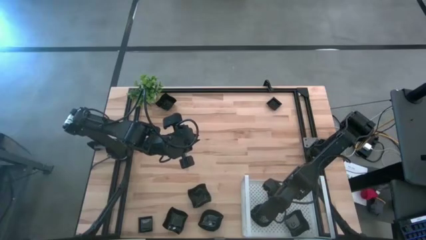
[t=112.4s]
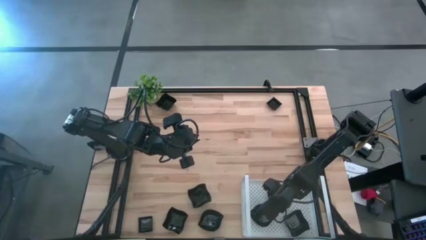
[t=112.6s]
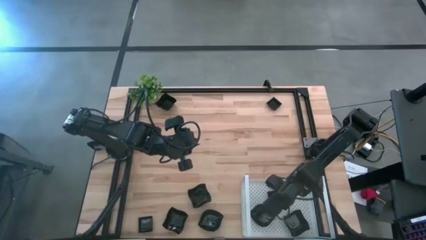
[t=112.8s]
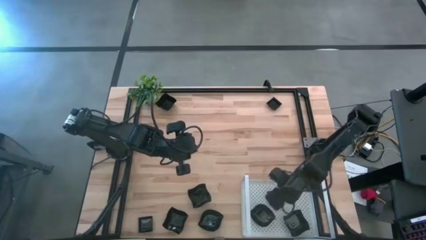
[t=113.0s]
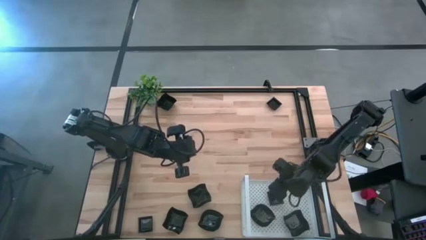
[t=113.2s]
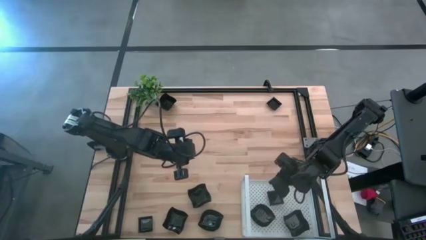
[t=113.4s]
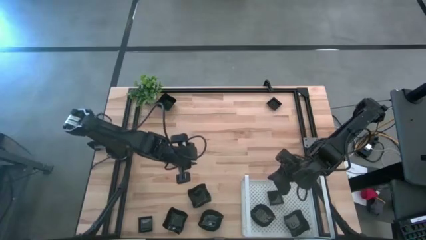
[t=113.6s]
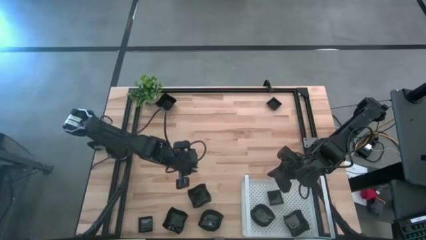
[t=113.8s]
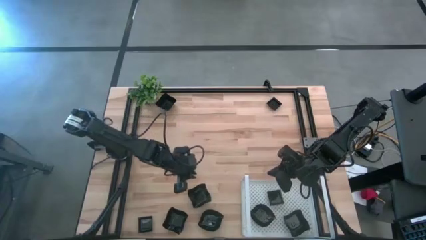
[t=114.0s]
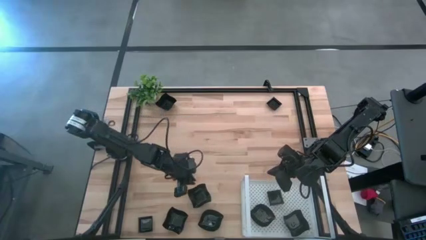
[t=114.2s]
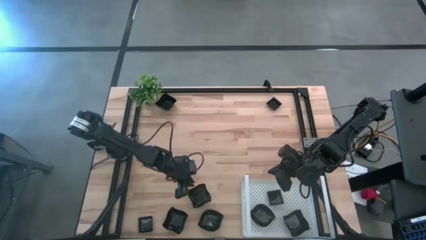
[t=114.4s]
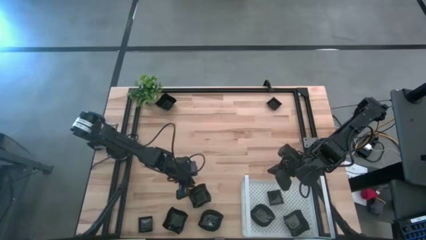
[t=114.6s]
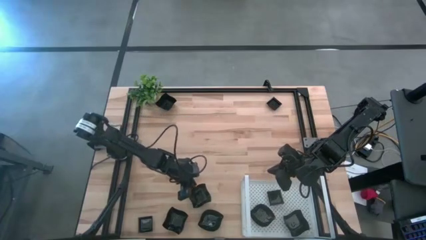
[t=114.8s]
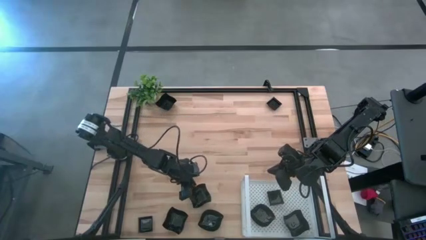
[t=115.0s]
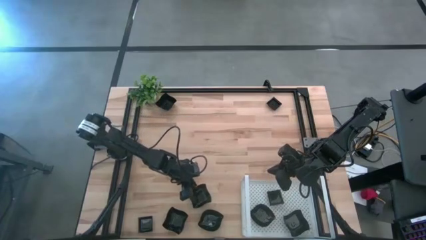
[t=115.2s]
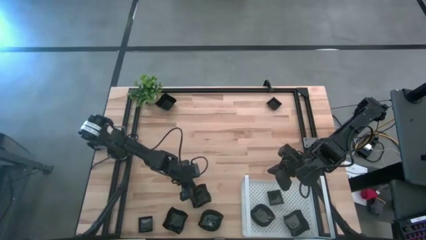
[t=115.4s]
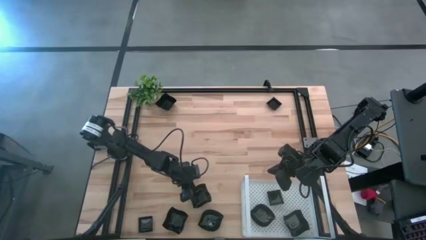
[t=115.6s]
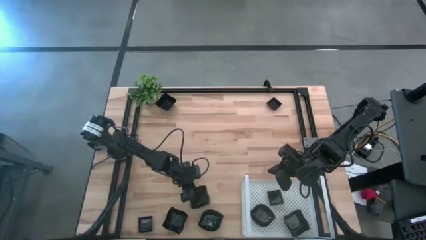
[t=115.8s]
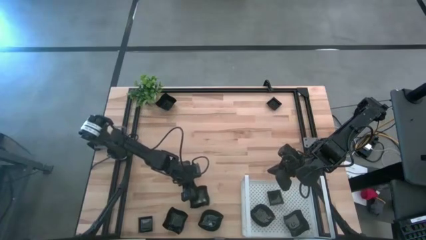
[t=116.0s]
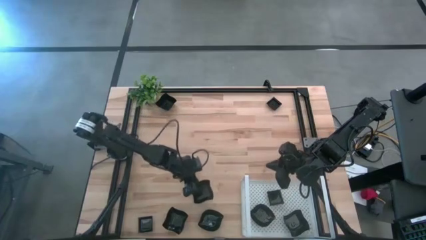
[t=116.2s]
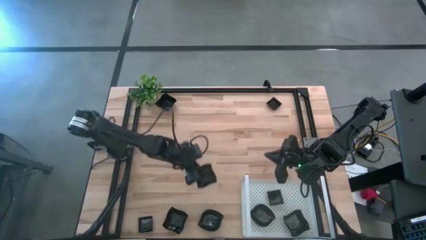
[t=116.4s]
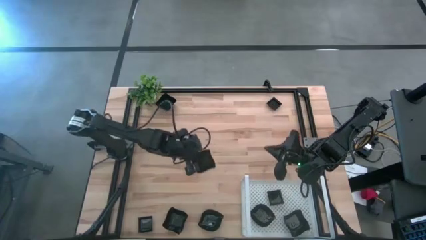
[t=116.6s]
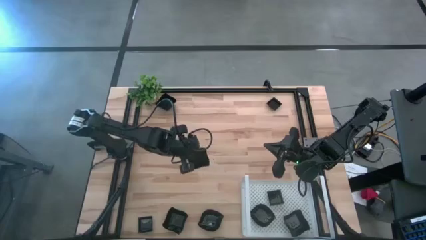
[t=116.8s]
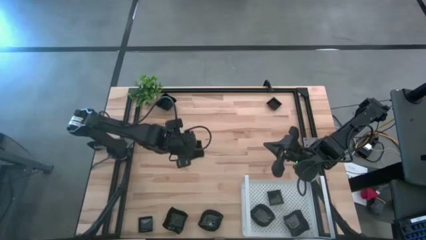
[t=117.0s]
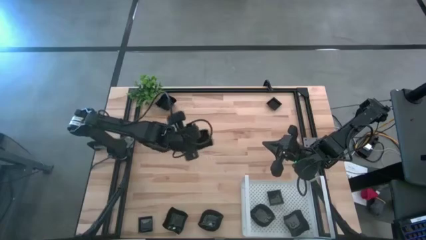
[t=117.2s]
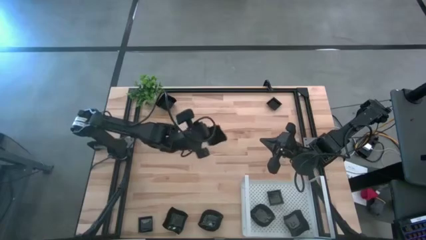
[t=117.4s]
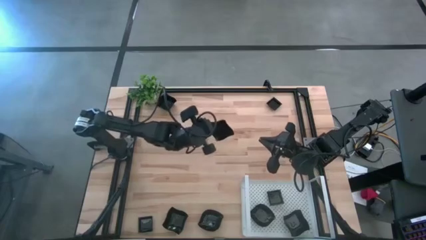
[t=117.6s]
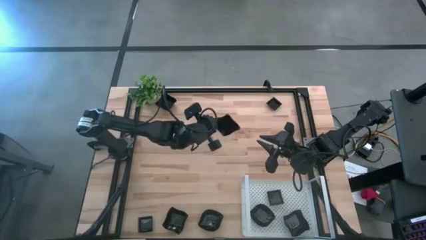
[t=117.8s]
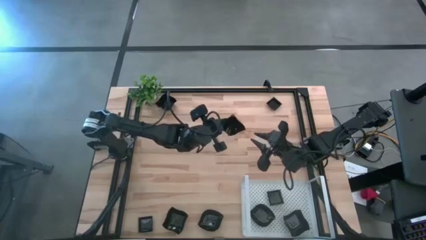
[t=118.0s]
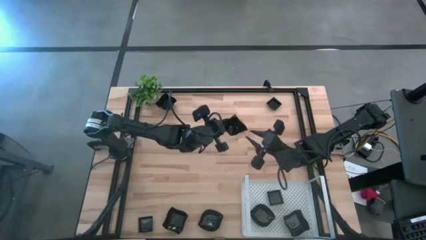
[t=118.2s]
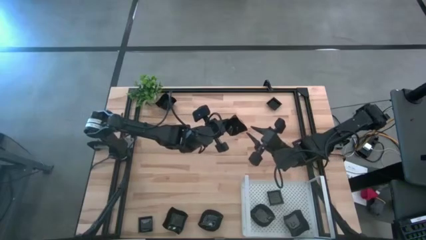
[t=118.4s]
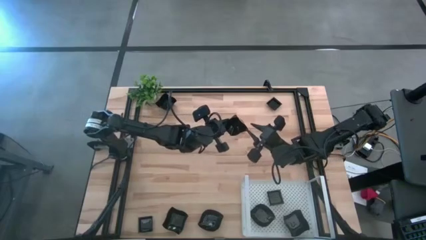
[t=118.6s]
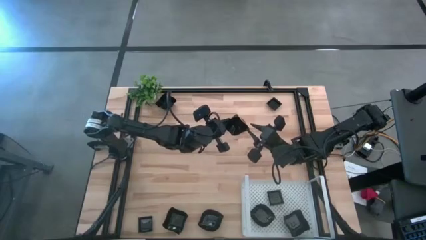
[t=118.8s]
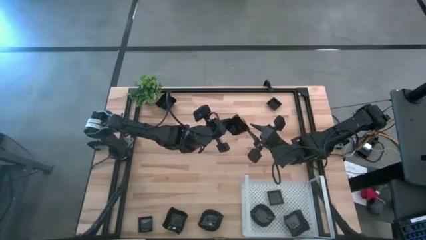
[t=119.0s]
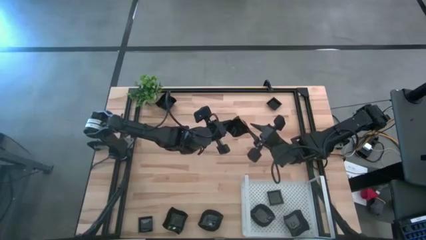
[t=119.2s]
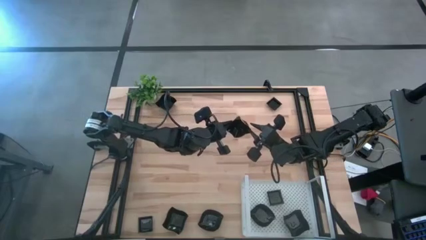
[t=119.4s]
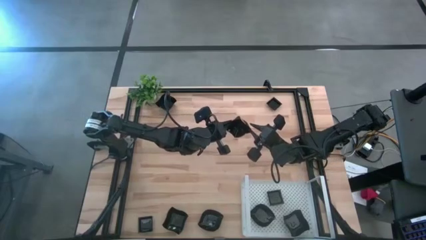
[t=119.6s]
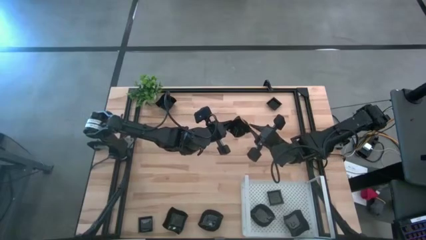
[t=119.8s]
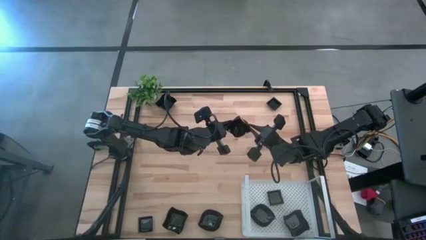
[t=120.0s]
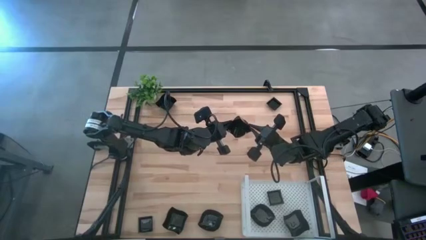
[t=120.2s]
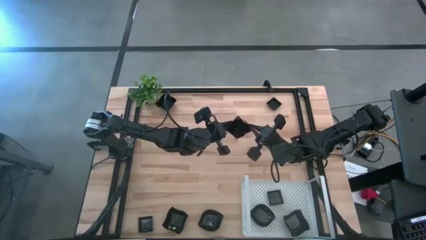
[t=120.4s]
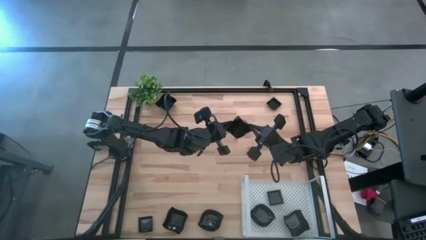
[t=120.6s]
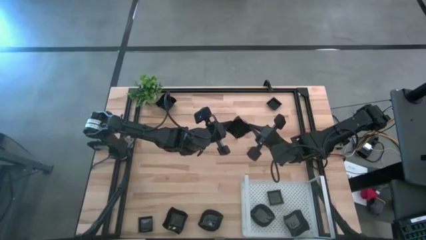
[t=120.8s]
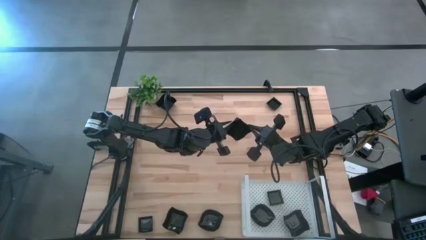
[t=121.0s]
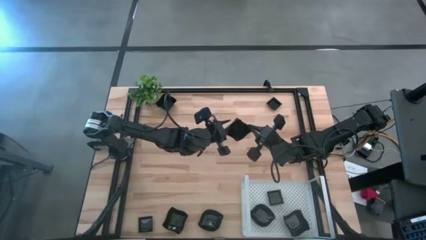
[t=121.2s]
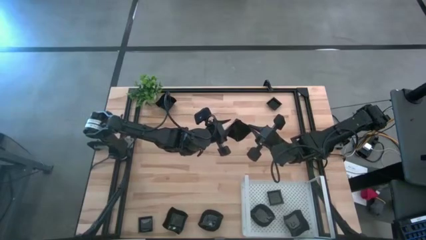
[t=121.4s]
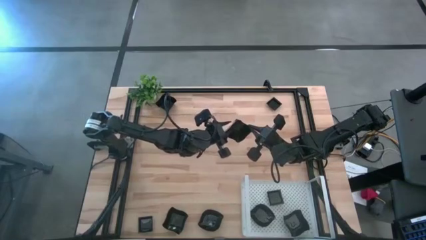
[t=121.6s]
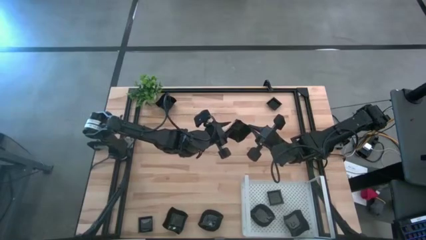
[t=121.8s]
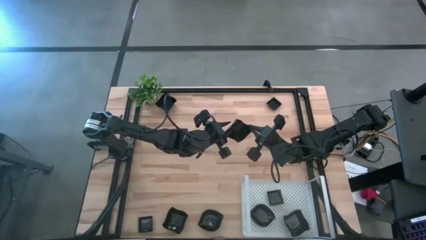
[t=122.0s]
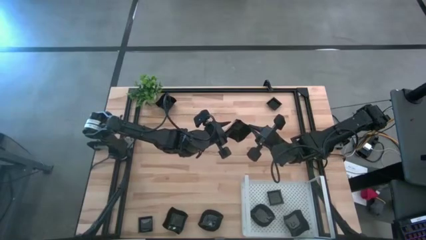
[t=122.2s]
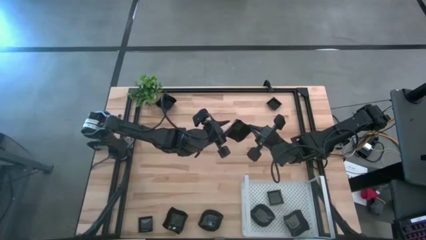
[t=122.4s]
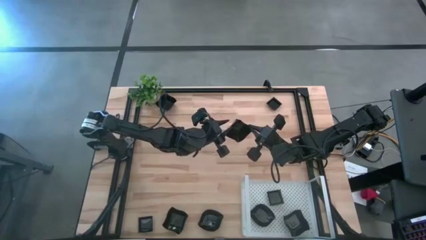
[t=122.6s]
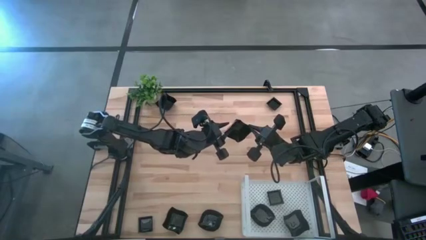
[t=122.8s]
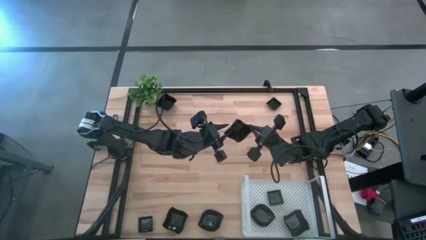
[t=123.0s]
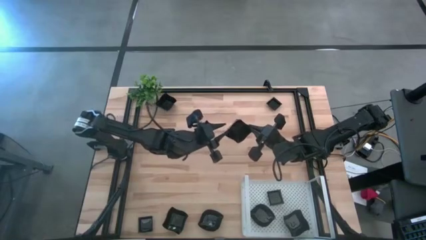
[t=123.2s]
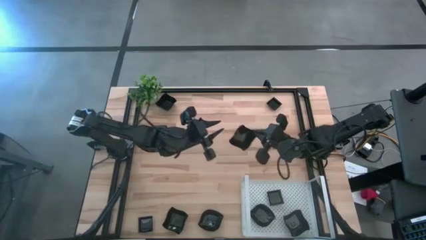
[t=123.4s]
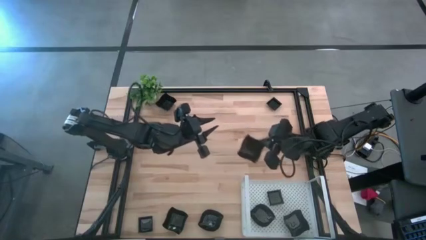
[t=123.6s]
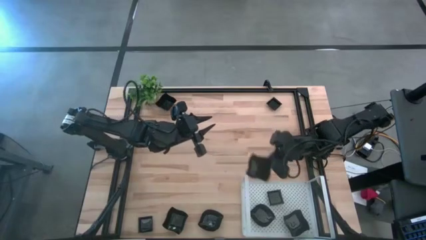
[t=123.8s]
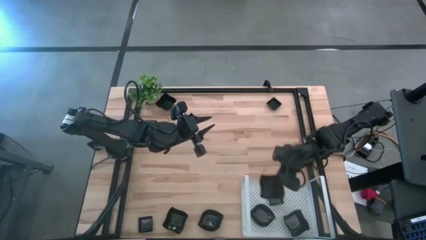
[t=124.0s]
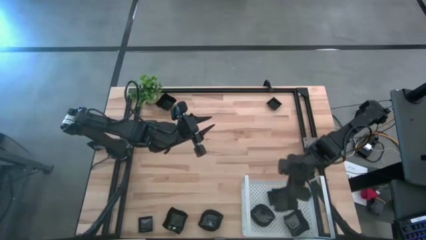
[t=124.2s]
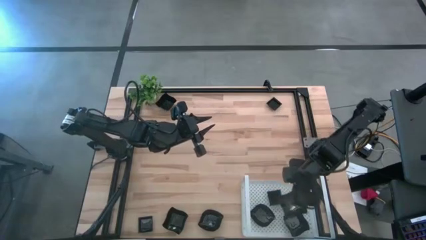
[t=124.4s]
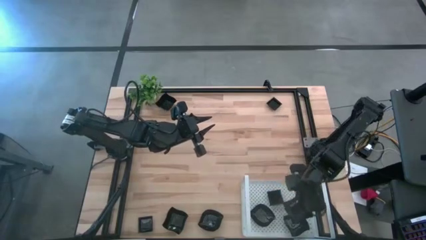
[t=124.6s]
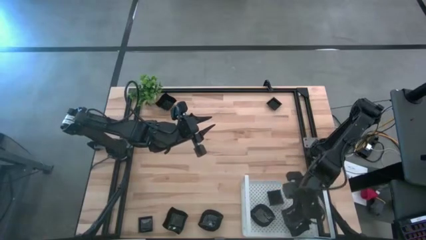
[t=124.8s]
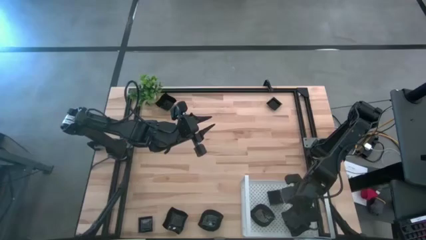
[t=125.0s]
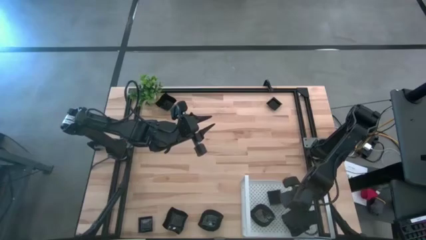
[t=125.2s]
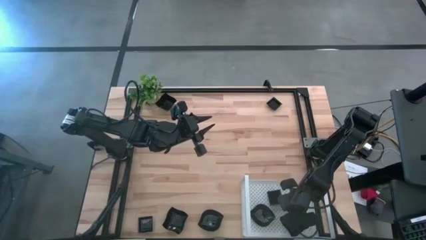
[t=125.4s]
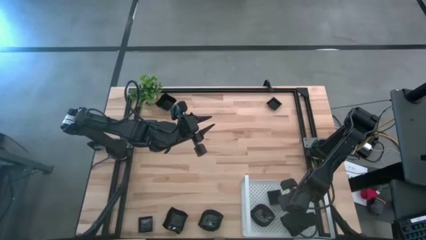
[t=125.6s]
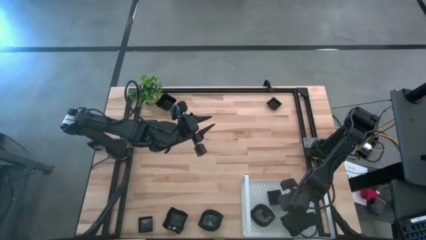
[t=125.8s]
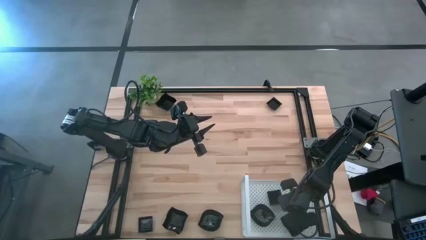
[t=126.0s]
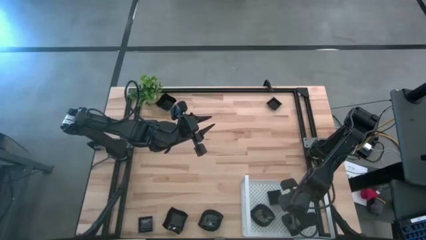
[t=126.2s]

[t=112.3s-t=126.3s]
Task: Pick & Place Mini shaped plates
Stack the distorted square plate on top of the other distorted square plate on the shelf
